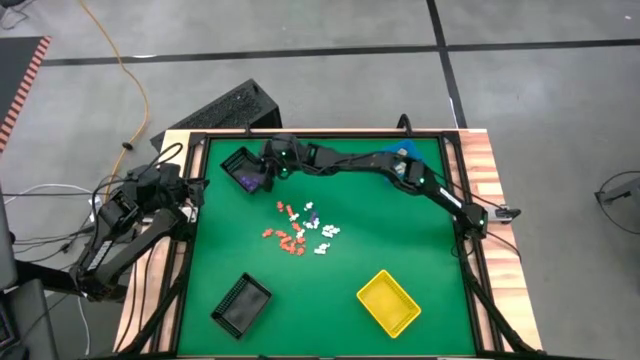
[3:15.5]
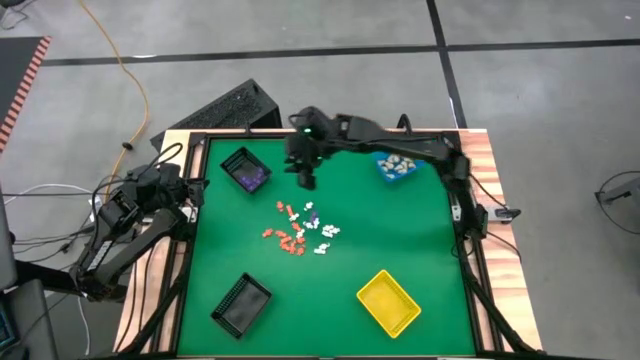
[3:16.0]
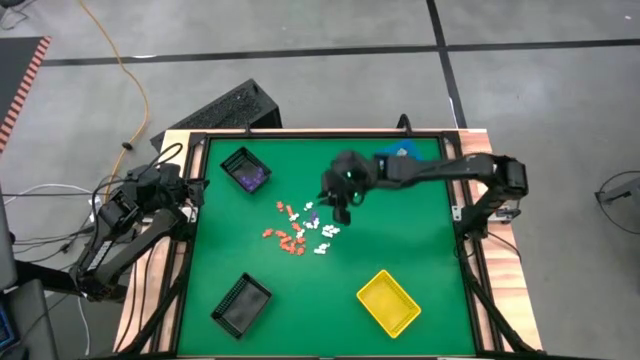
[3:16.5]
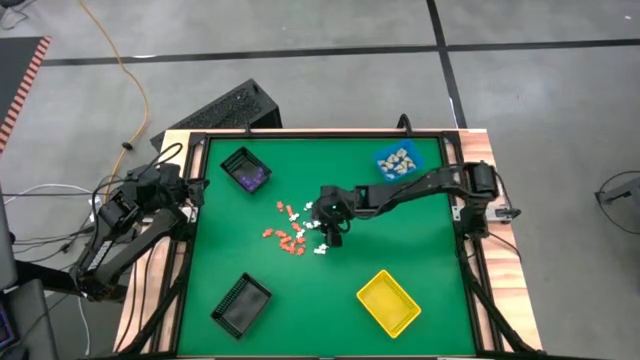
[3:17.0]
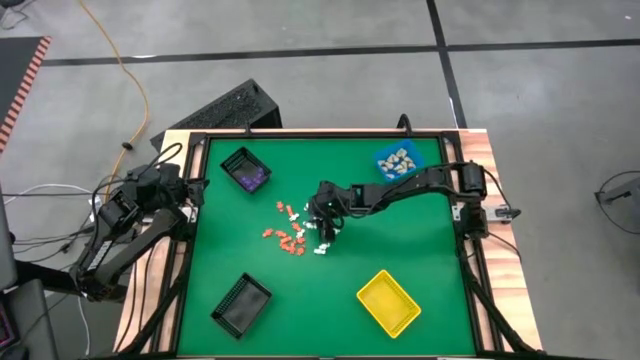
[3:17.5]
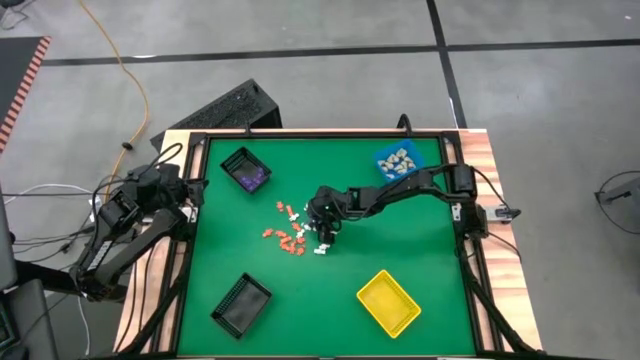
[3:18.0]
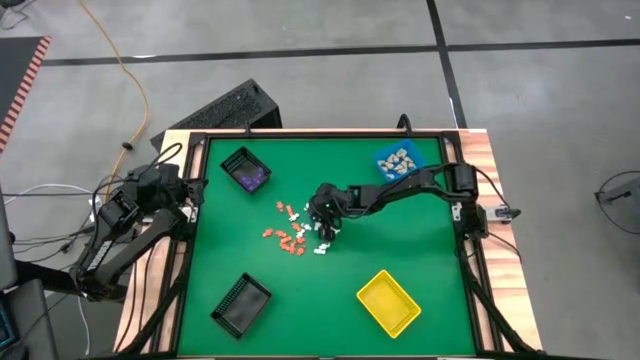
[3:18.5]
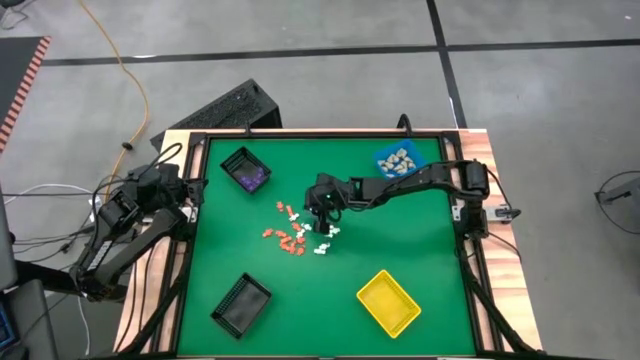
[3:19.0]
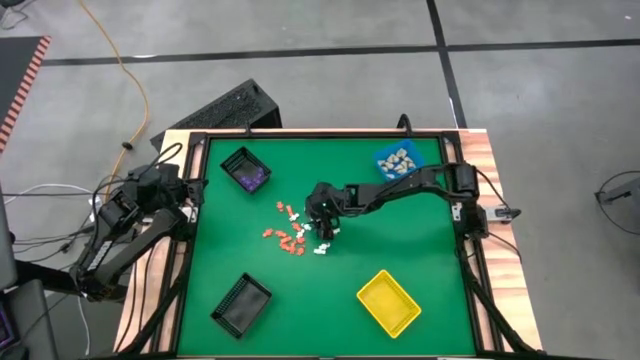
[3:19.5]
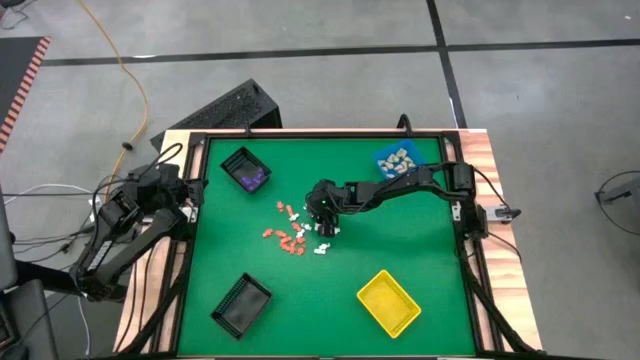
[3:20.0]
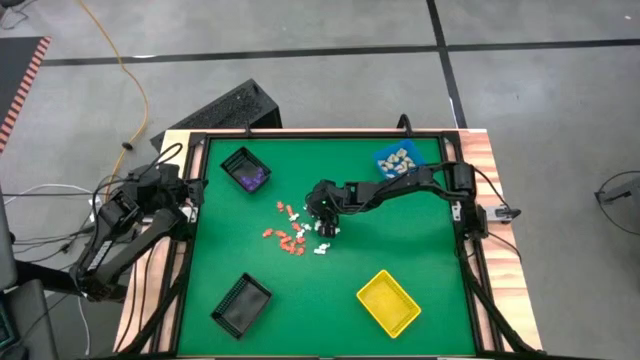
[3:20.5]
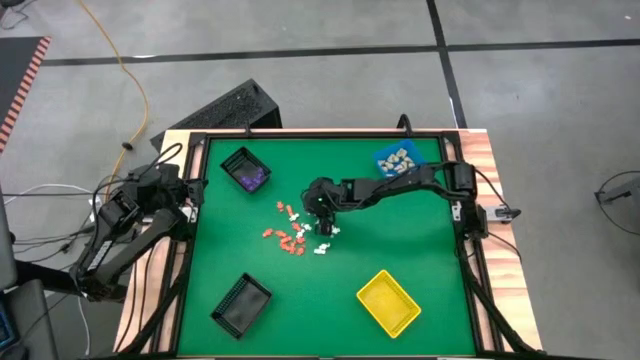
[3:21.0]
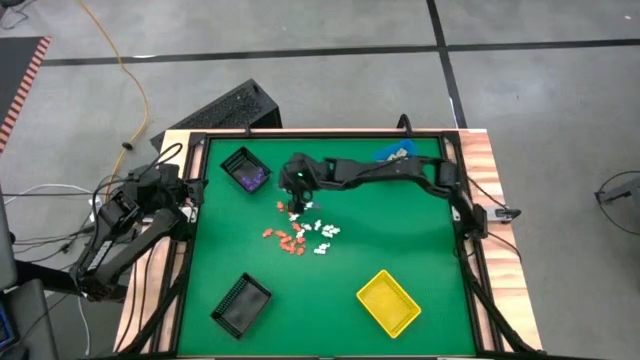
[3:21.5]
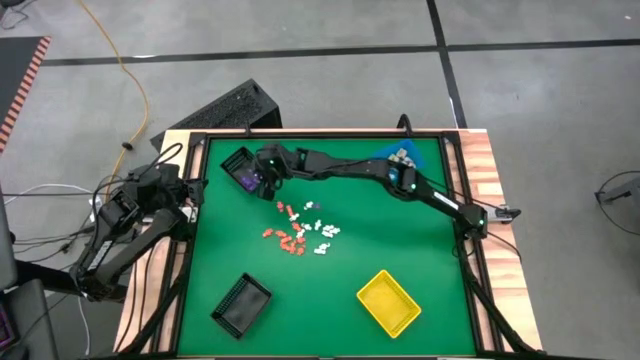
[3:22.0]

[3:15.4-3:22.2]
Task: Sort Halloween decoration
Put the purple spider toy into the top black basket

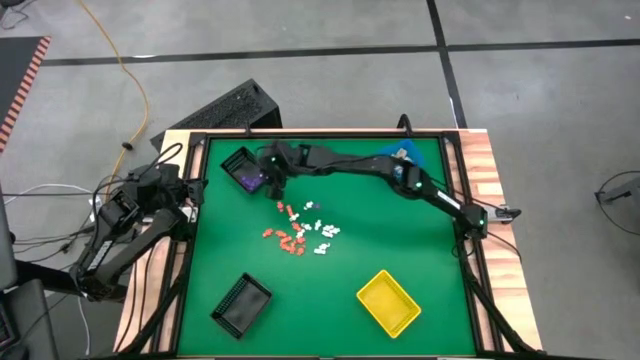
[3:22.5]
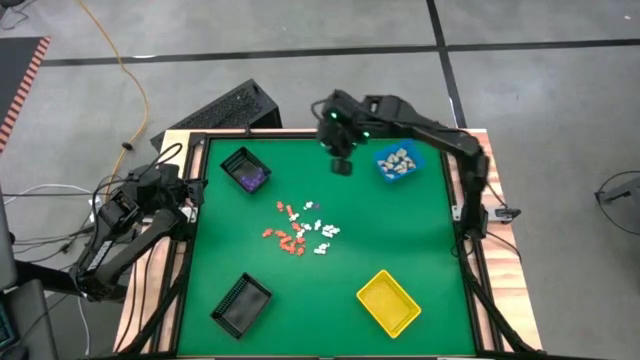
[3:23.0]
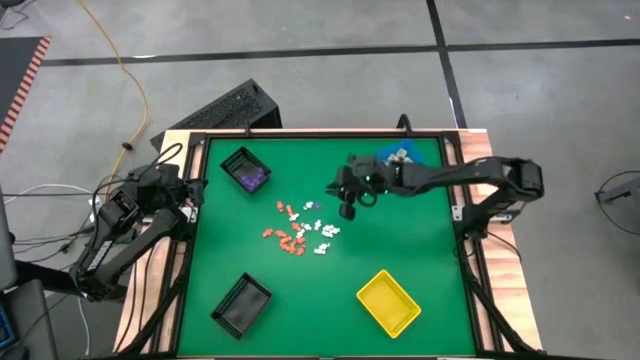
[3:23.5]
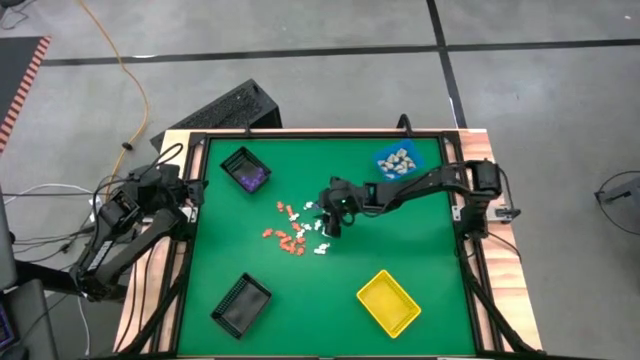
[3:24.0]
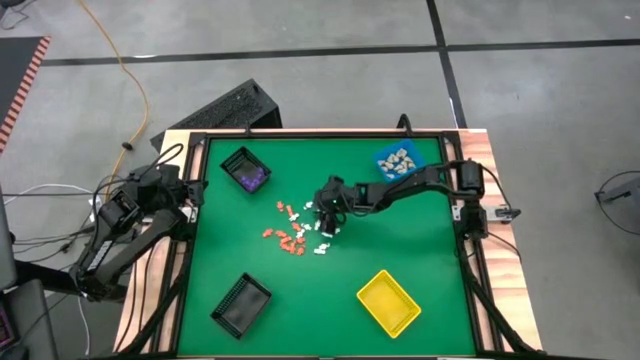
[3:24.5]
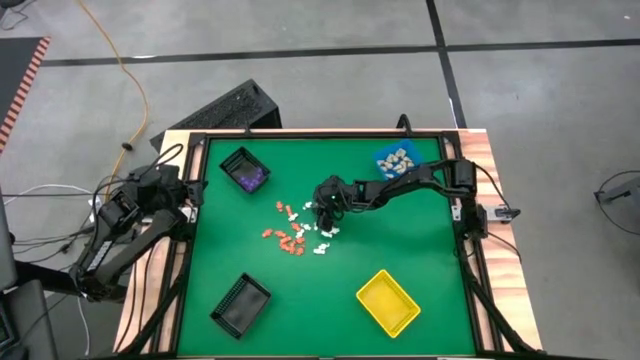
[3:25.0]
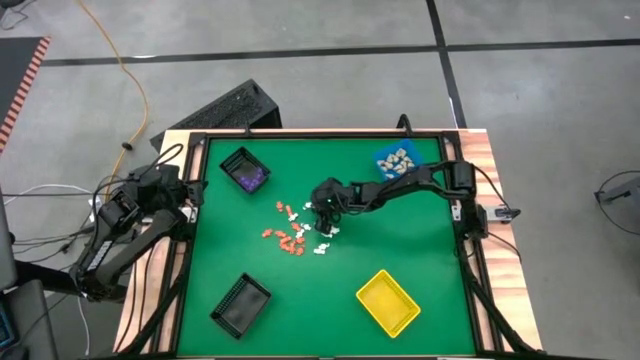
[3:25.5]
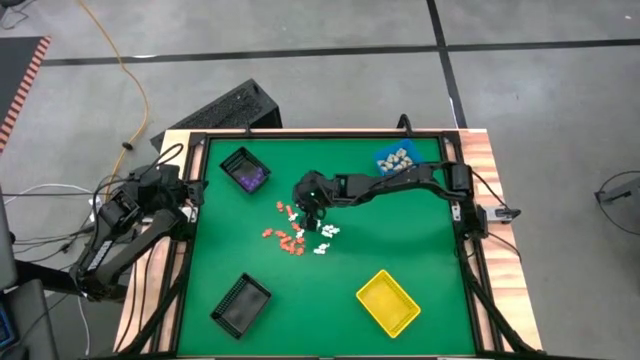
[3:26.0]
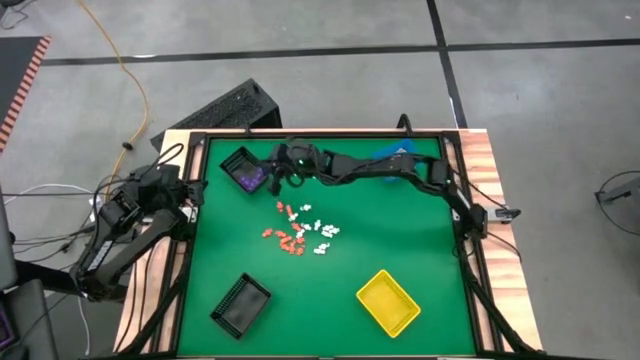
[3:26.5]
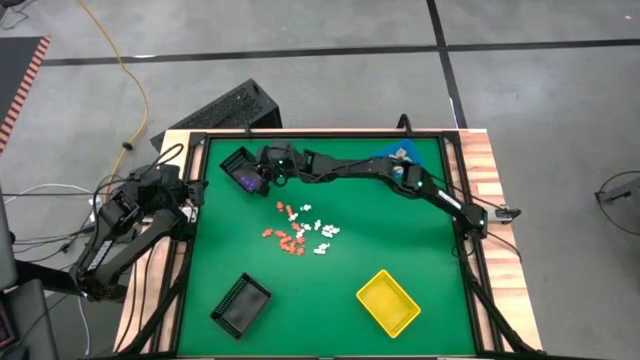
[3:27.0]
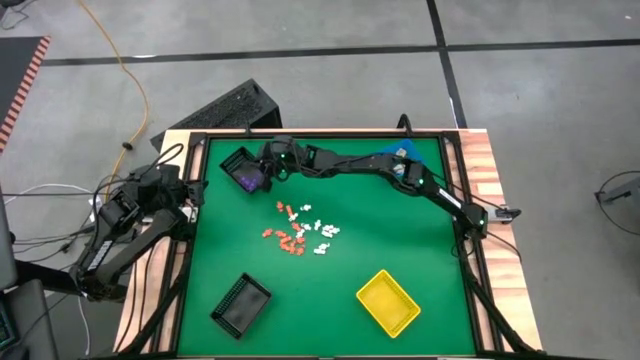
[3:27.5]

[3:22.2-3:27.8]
Put the purple spider toy into the top black basket

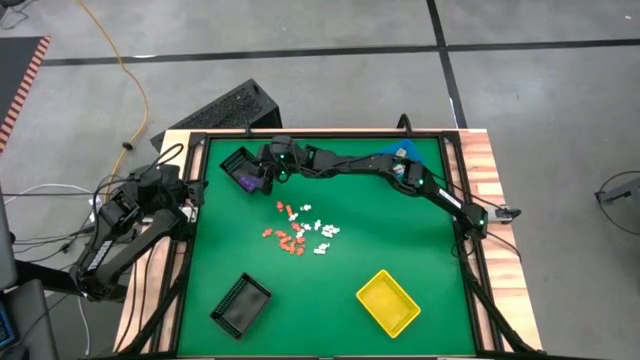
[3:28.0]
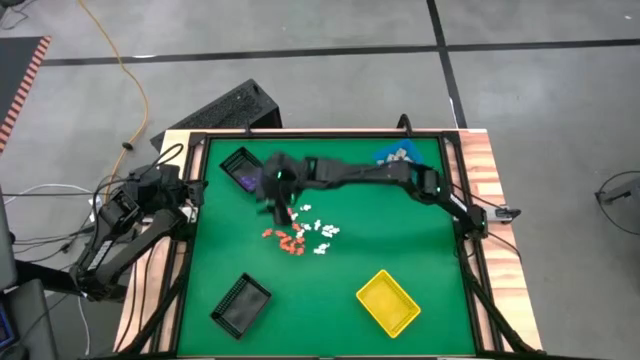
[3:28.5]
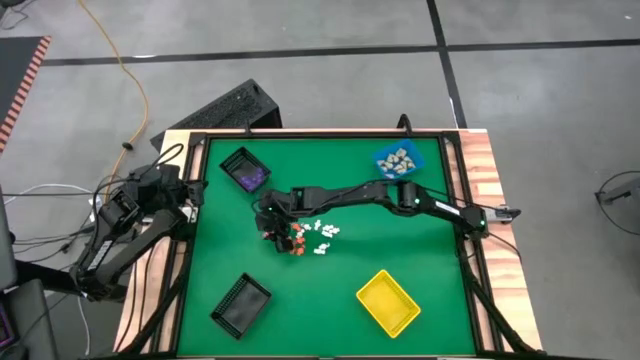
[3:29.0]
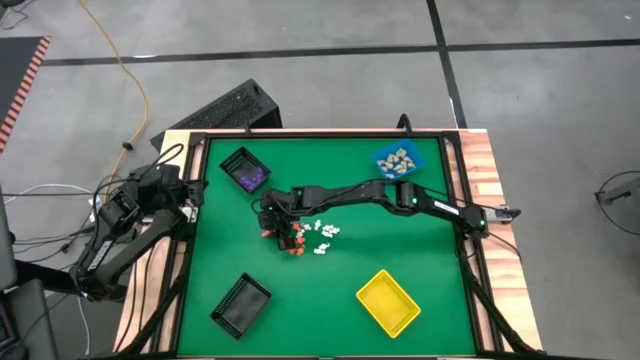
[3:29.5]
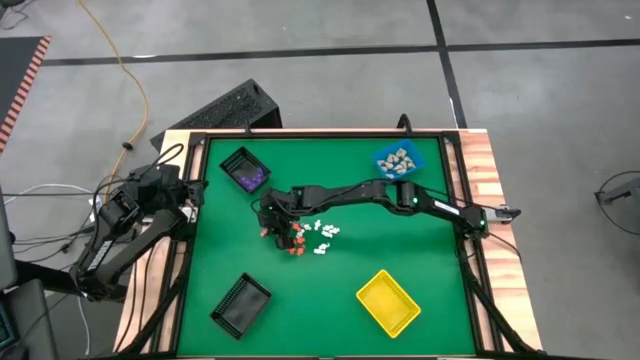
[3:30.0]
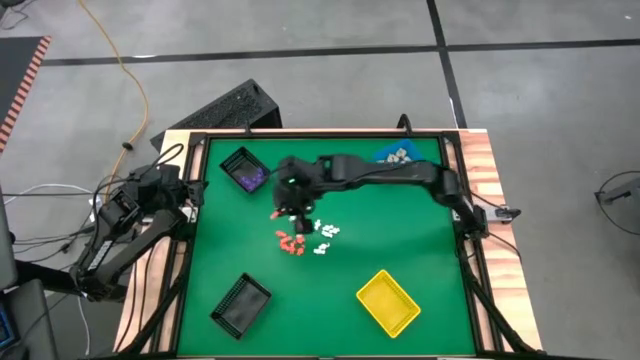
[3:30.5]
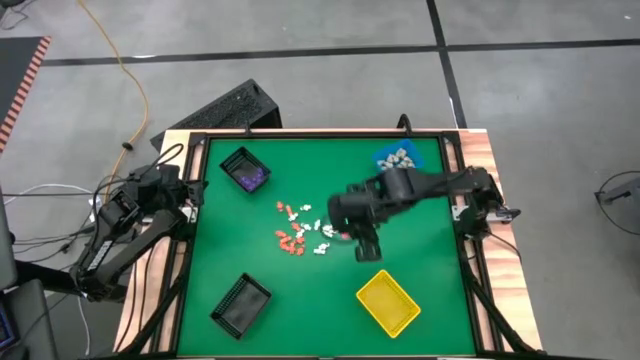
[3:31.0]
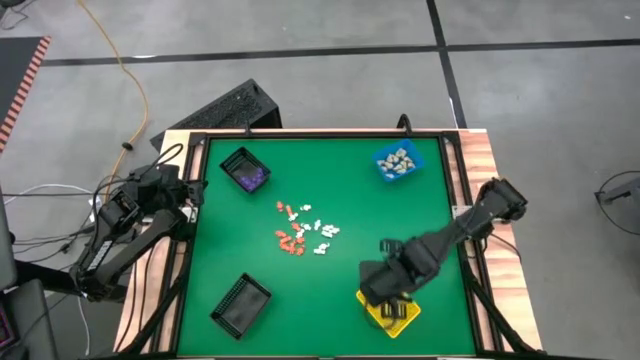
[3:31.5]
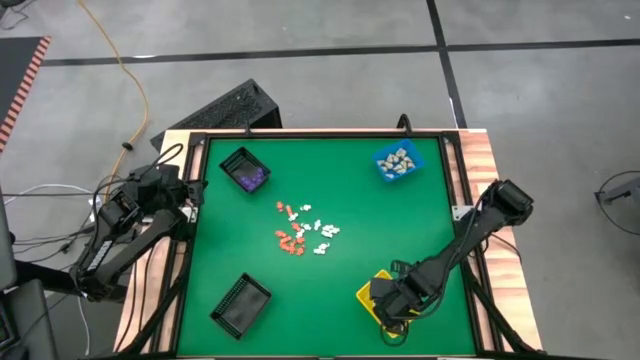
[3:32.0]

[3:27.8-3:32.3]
Put the orange skeleton toy into the yellow basket

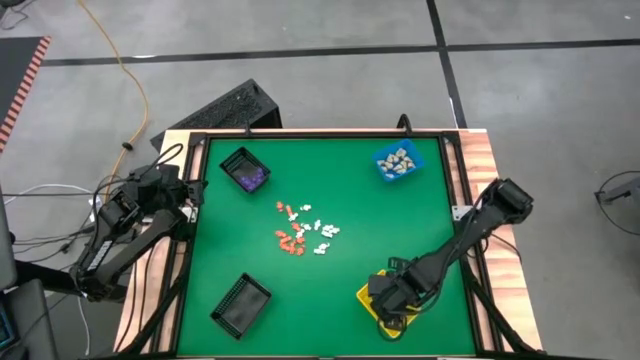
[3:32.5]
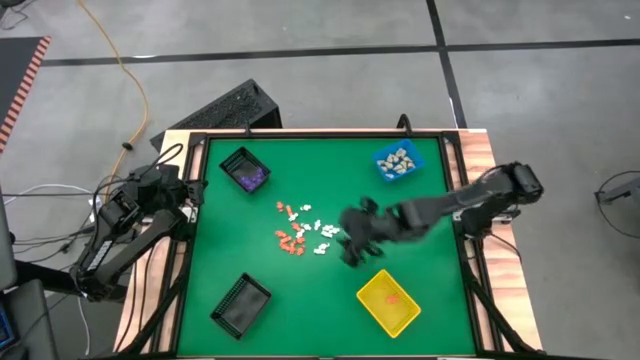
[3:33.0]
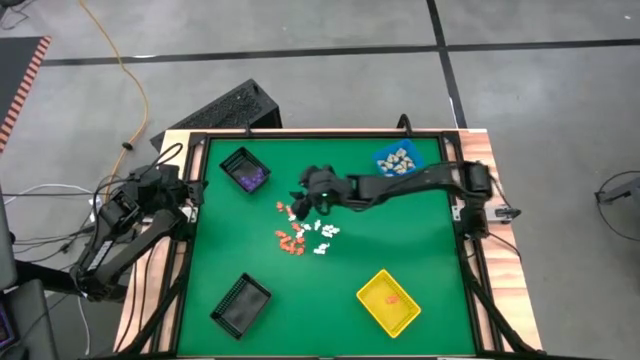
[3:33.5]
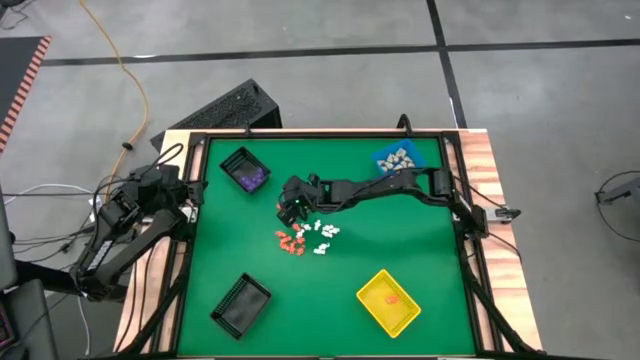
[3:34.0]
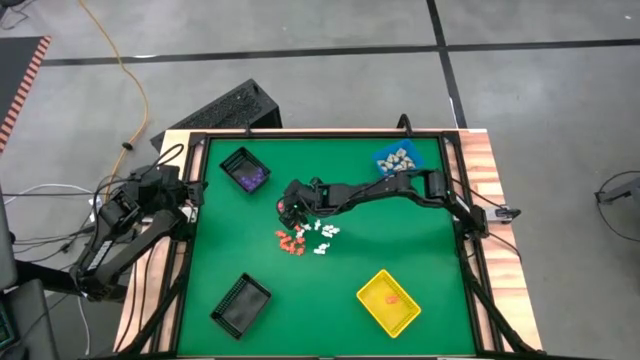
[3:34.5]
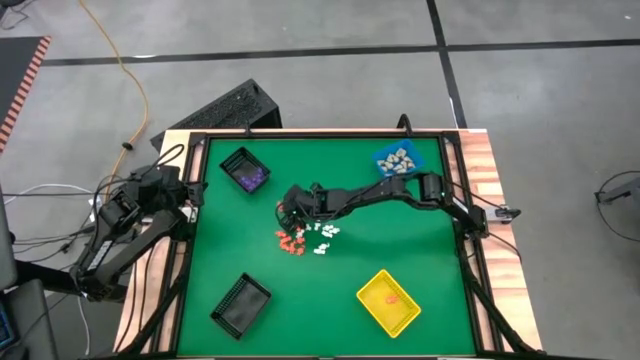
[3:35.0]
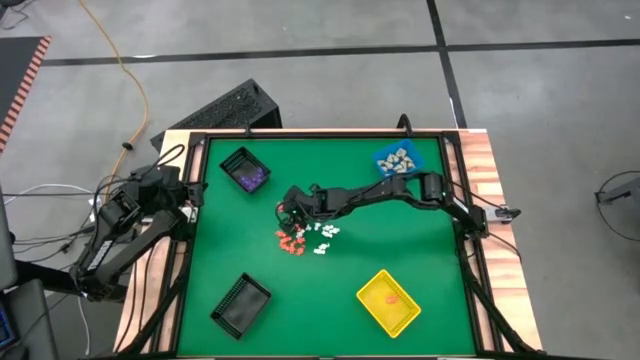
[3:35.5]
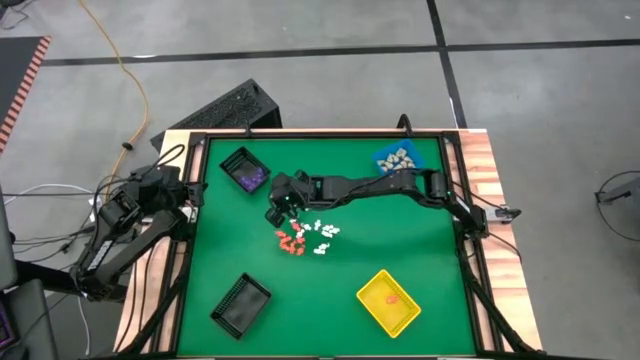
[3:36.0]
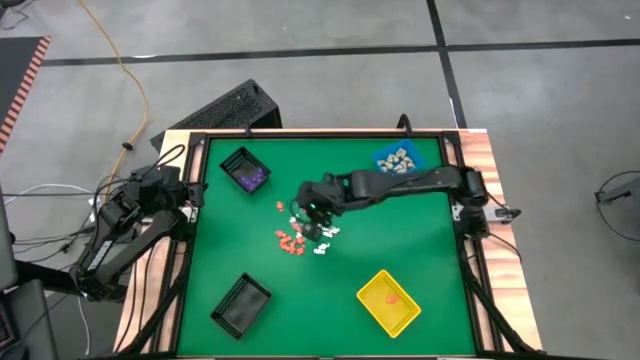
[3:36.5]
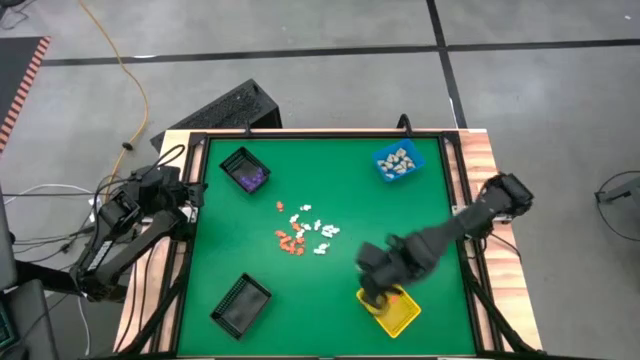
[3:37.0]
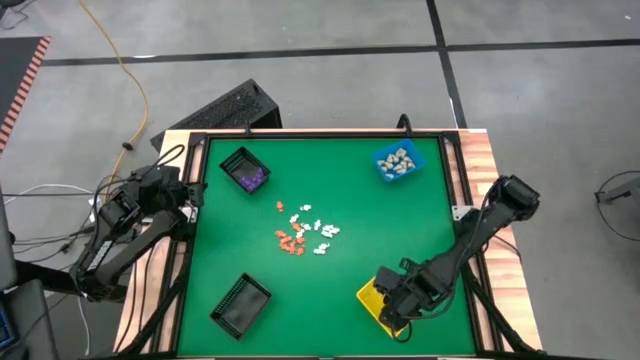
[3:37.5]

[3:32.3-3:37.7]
Put the orange skeleton toy into the yellow basket
